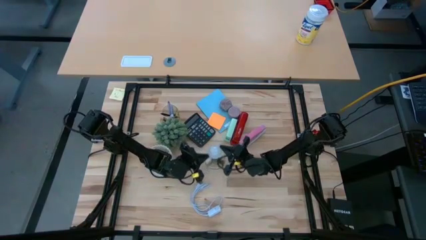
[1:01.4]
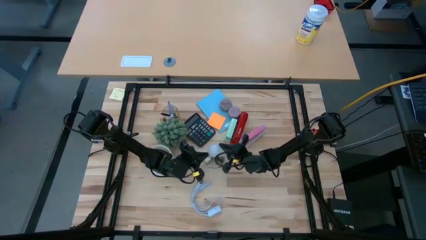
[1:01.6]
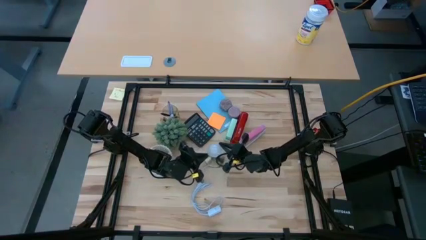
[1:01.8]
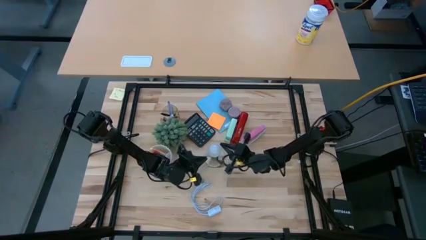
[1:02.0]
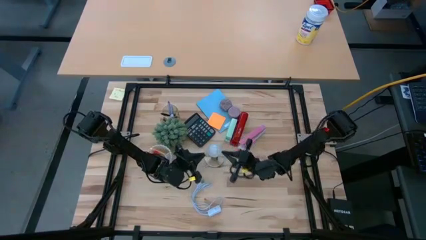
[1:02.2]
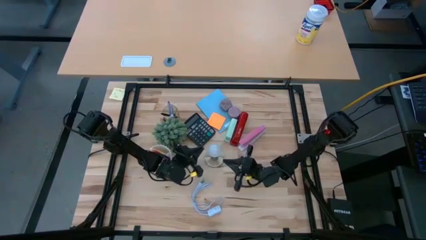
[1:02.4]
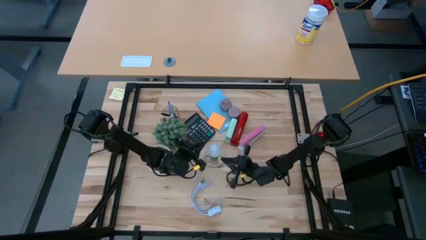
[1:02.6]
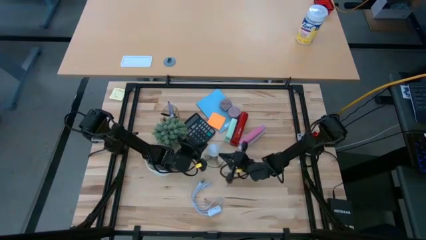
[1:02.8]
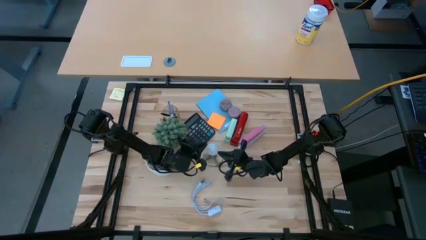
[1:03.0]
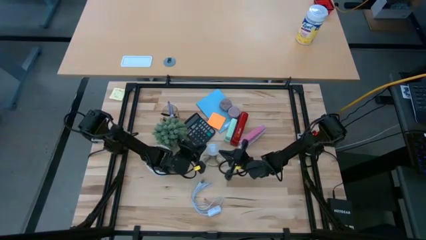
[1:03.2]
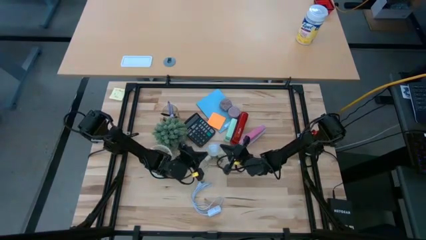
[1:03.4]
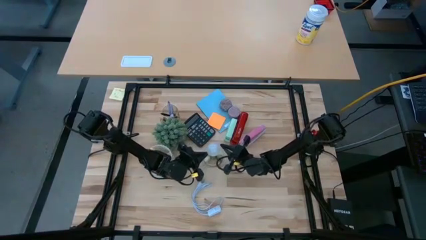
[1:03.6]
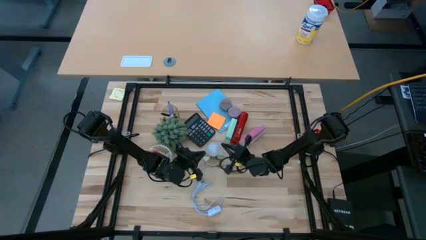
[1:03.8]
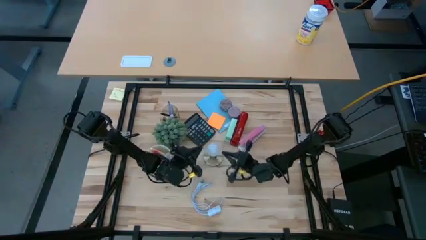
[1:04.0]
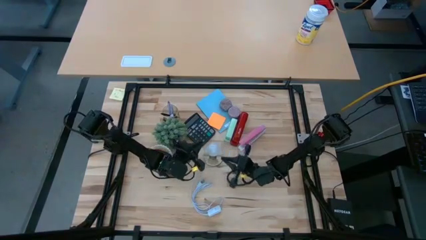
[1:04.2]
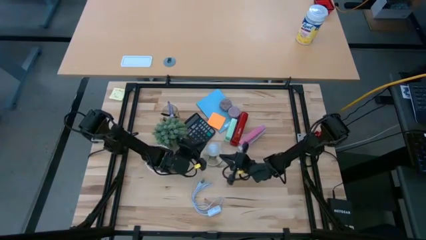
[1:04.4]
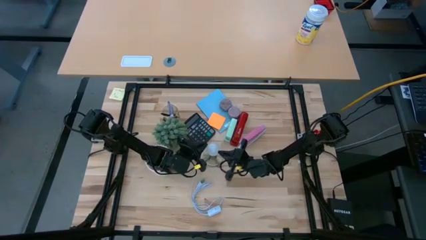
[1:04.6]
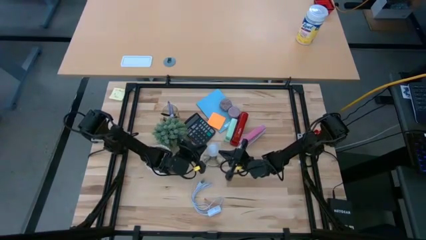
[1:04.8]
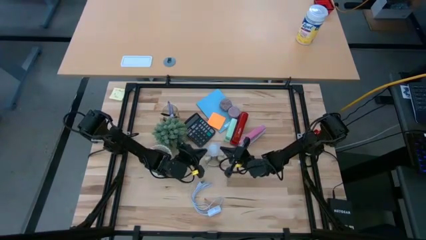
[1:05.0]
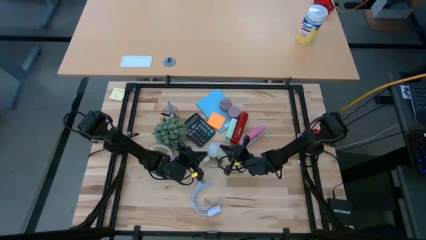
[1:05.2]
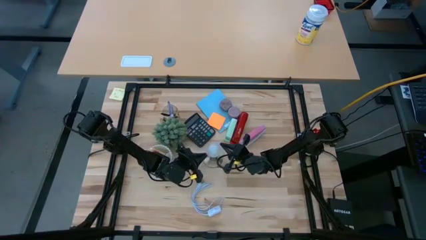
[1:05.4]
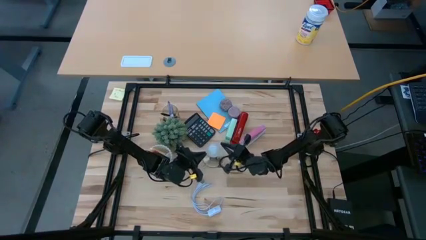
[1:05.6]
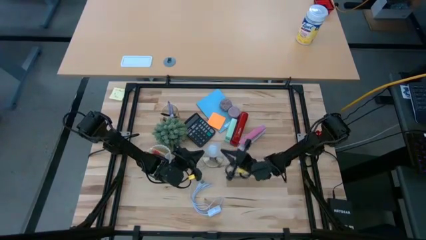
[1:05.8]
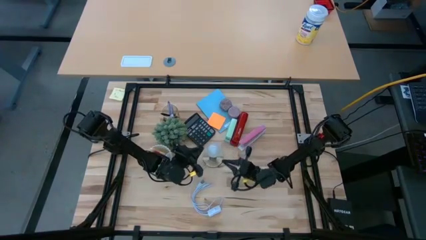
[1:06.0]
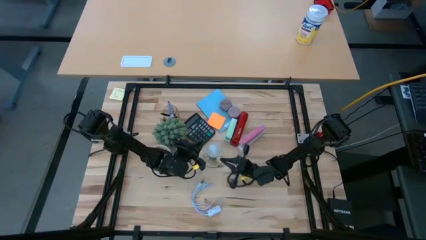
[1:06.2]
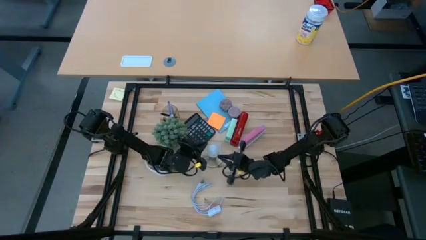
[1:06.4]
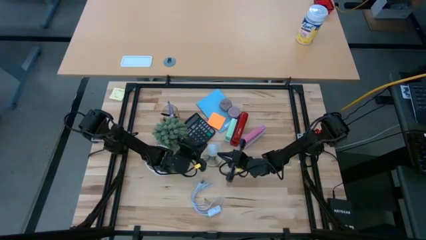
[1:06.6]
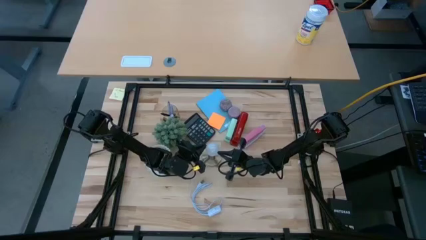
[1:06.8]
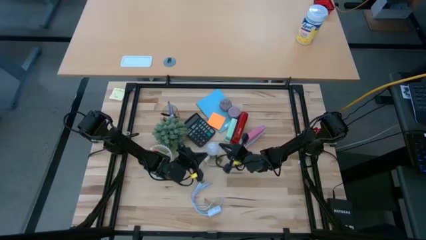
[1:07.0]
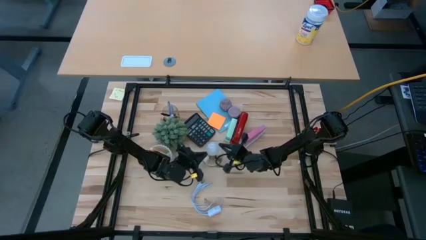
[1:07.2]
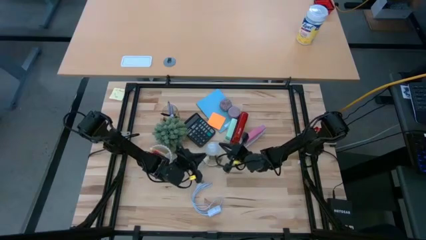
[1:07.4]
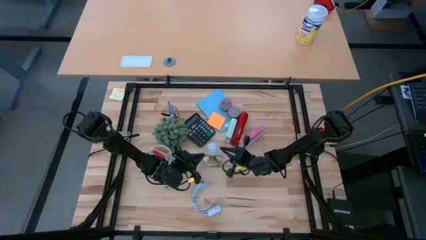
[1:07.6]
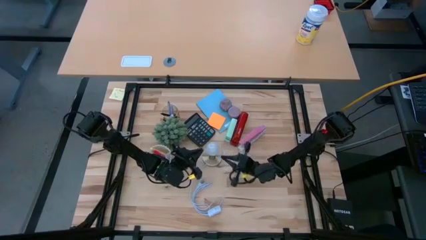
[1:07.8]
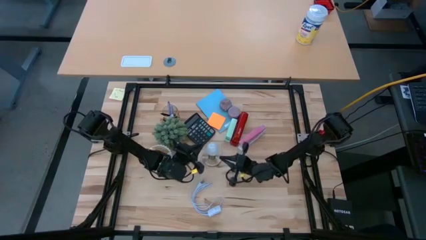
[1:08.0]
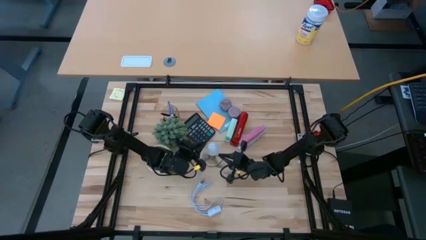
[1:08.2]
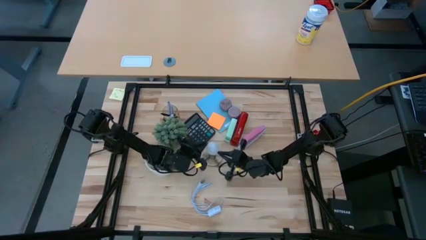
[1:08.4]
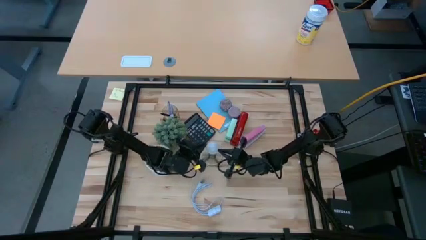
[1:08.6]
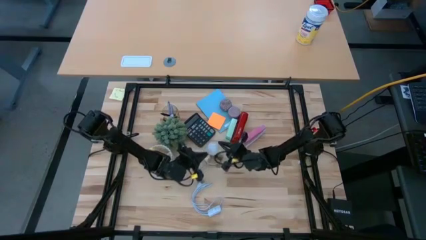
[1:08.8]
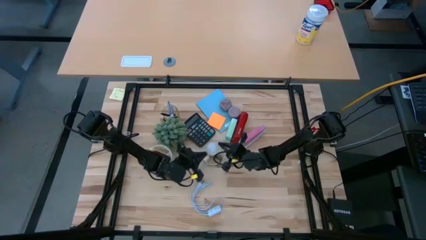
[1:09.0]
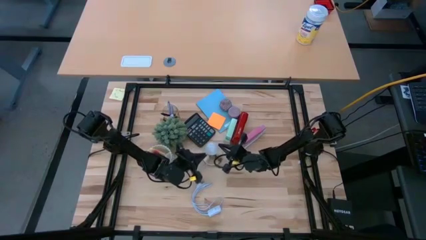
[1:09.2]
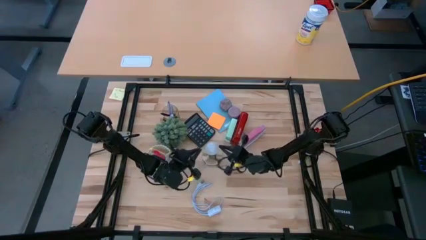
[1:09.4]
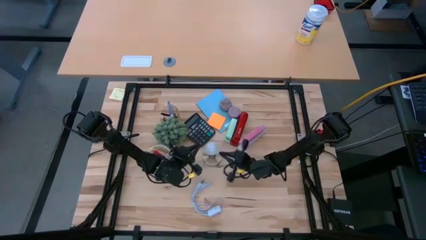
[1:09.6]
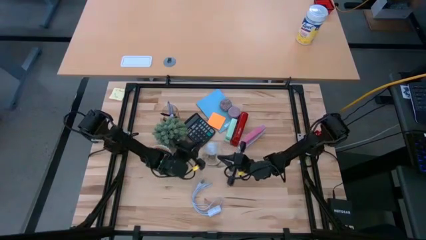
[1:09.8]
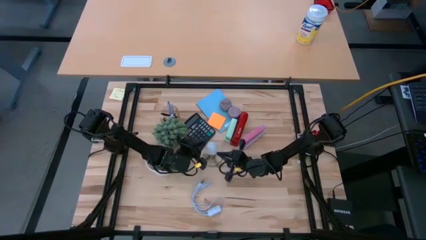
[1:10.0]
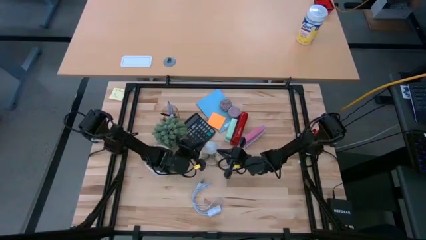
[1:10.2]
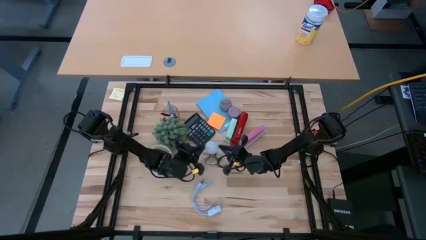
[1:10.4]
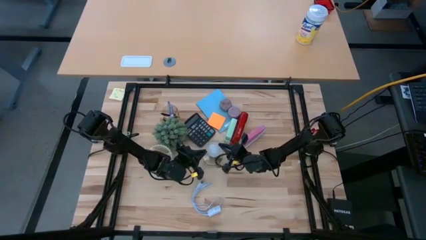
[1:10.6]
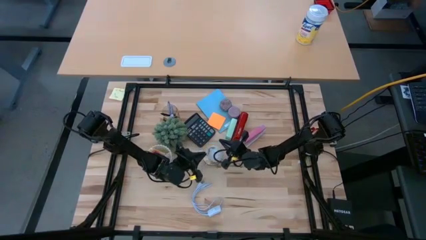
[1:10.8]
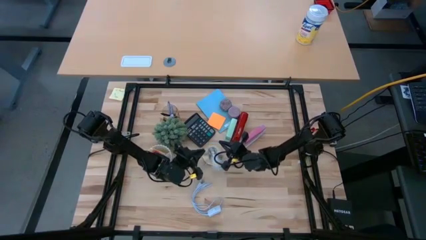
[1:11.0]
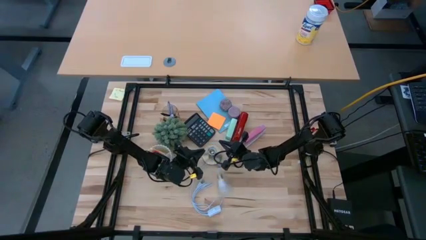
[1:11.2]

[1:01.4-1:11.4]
Task: Screw lightbulb
Remove the lightbulb from the lamp

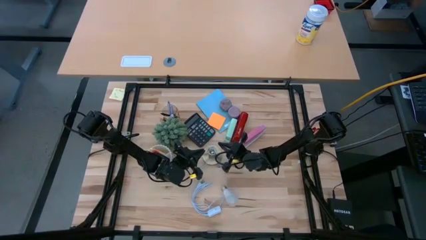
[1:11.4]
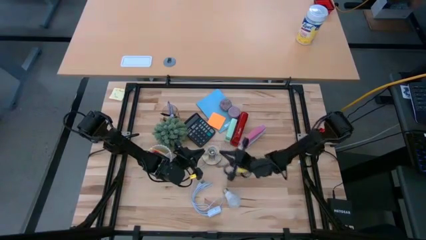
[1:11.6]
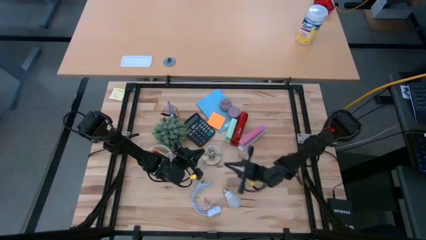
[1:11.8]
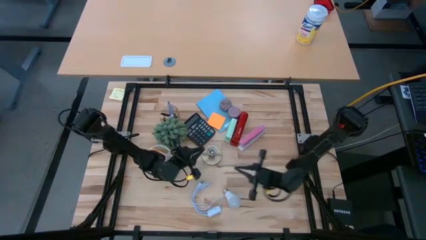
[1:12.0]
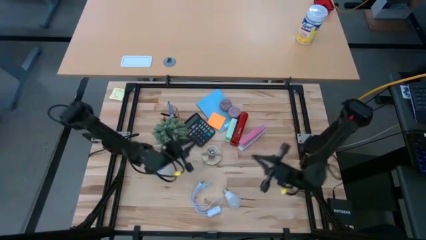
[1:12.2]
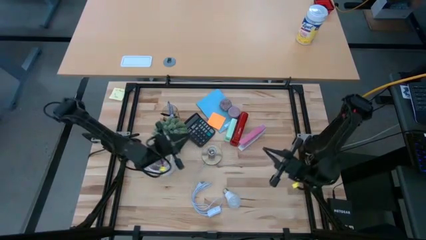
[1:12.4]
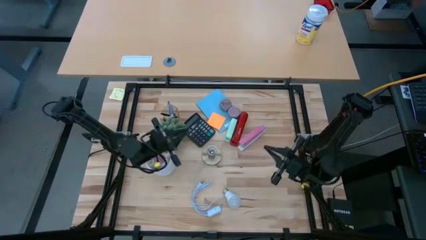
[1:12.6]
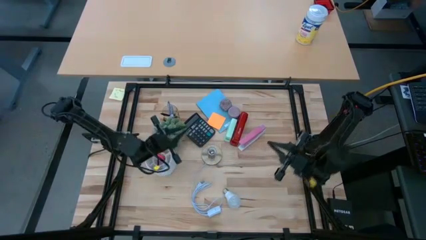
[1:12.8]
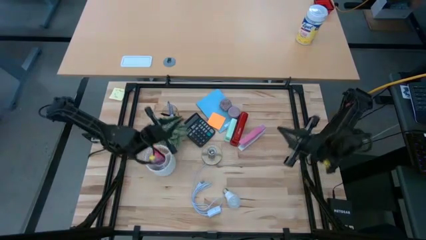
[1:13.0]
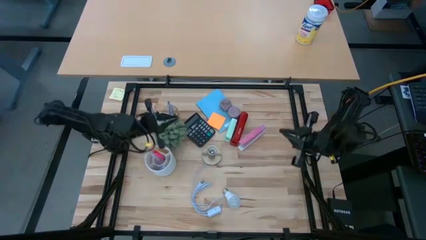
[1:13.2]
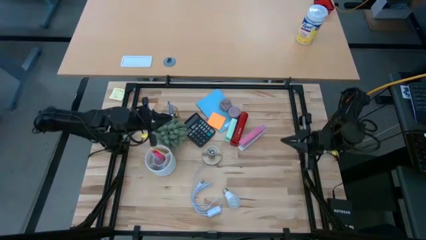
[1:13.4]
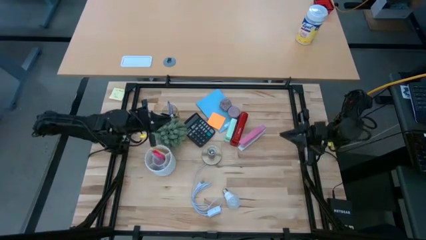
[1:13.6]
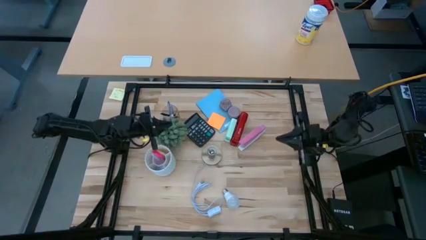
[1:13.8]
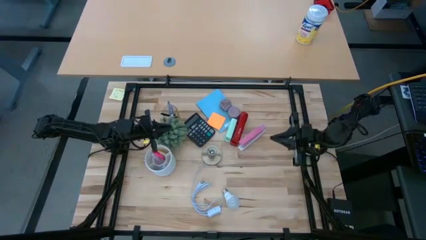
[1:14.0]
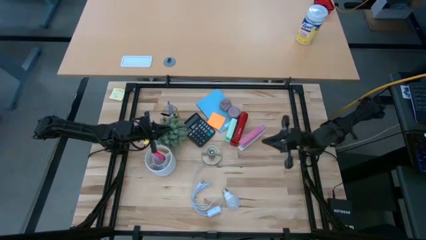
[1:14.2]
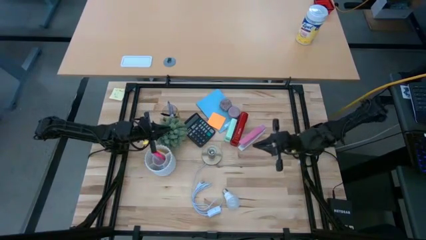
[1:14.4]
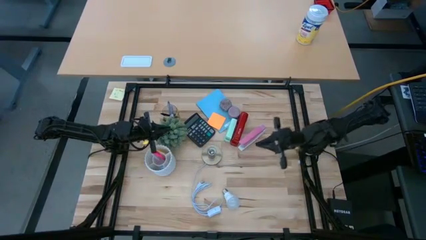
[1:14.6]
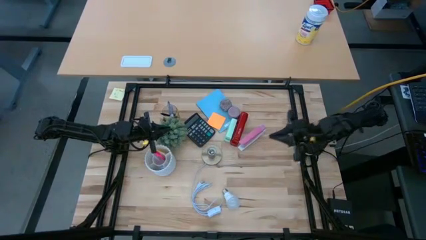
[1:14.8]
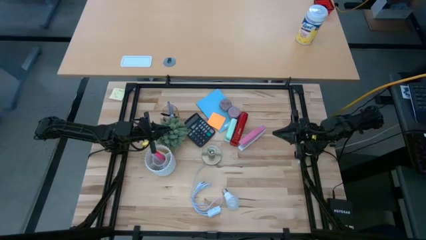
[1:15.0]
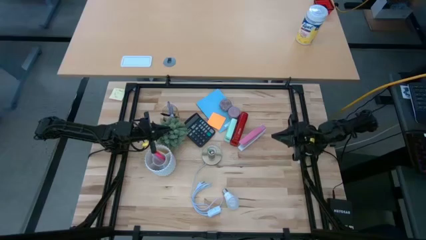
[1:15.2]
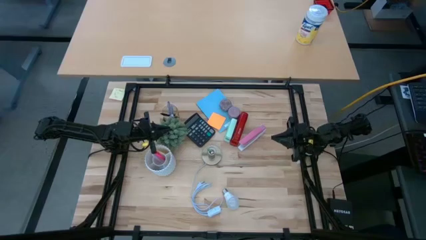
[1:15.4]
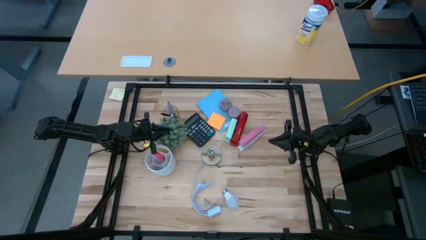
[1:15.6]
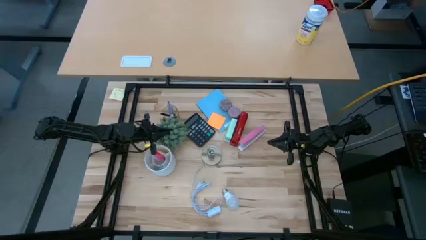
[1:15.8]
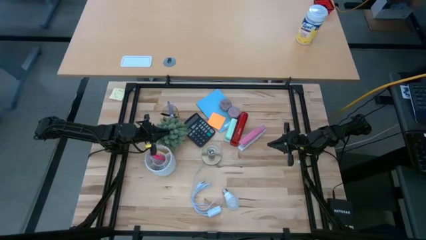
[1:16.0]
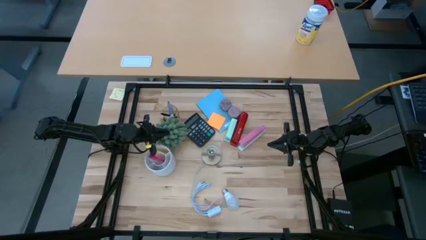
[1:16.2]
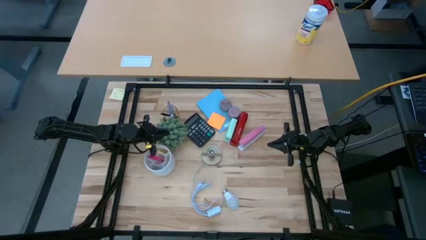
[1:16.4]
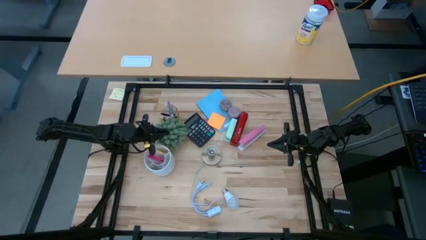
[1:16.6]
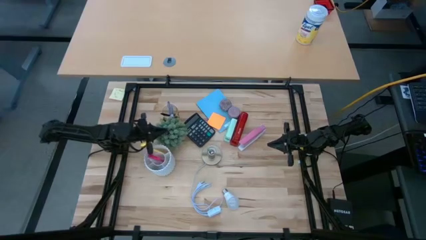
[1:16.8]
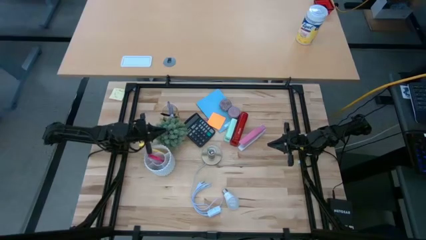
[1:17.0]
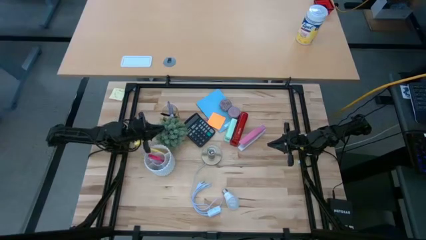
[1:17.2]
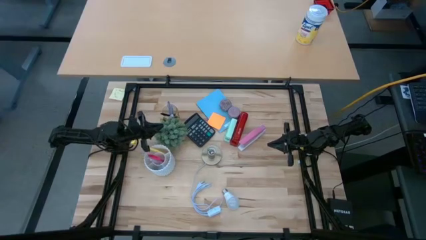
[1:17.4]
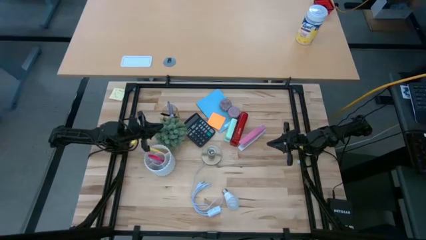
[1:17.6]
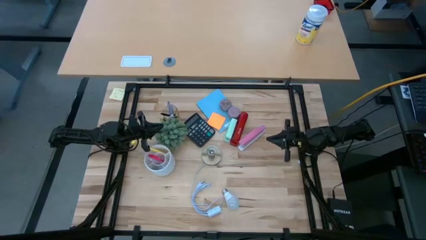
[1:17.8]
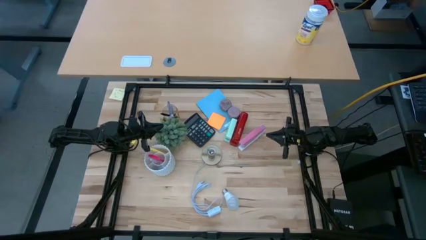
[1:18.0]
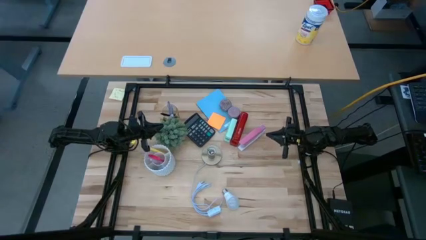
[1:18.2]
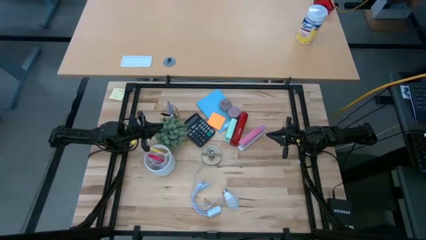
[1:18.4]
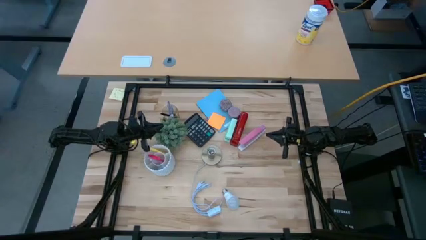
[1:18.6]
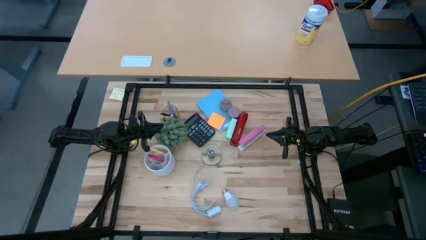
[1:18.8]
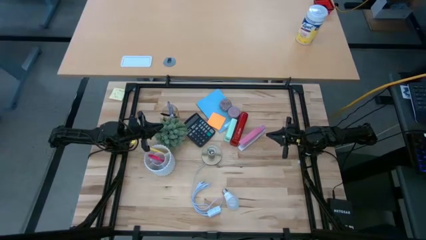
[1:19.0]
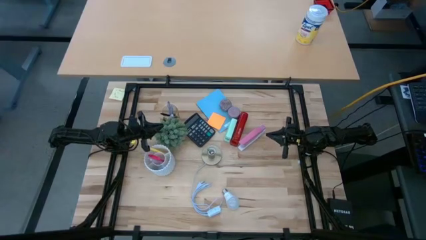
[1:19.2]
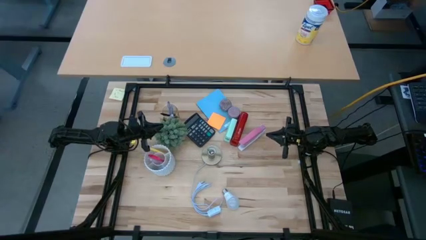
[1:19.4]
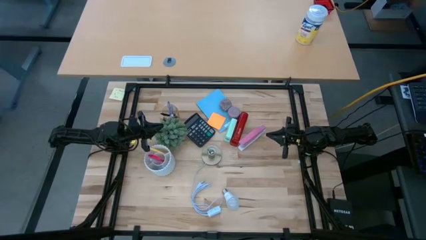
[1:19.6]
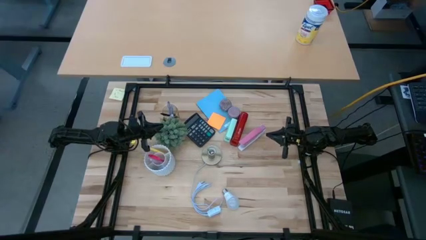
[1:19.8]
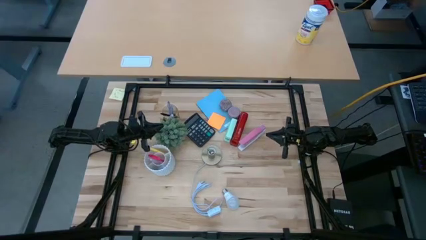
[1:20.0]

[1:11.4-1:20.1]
Return to Home Position
